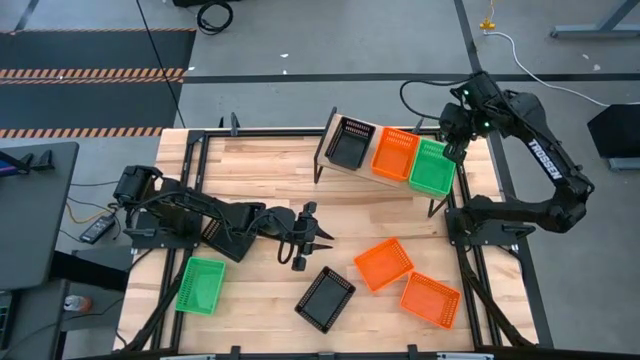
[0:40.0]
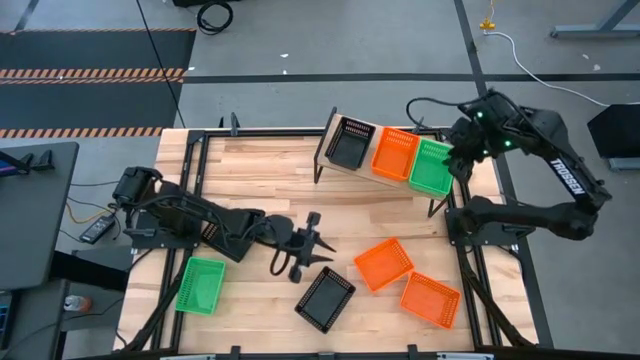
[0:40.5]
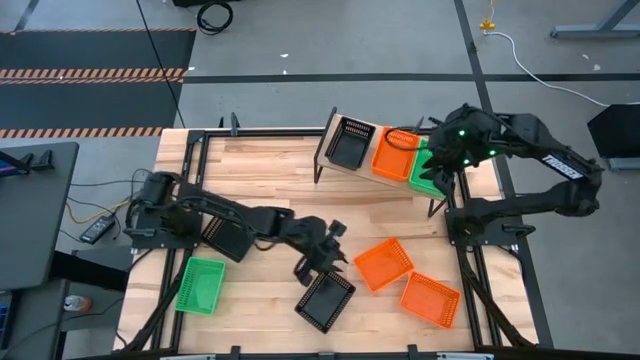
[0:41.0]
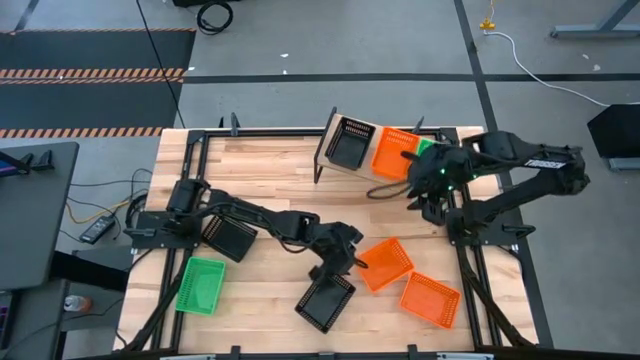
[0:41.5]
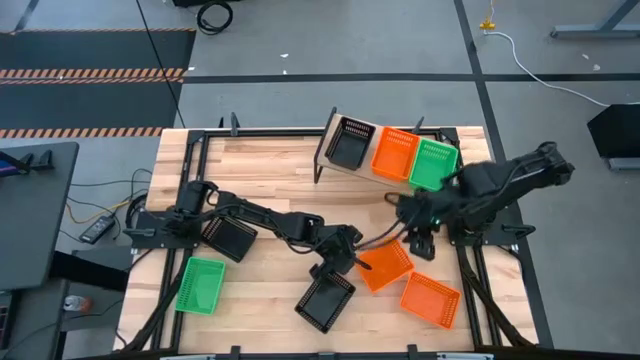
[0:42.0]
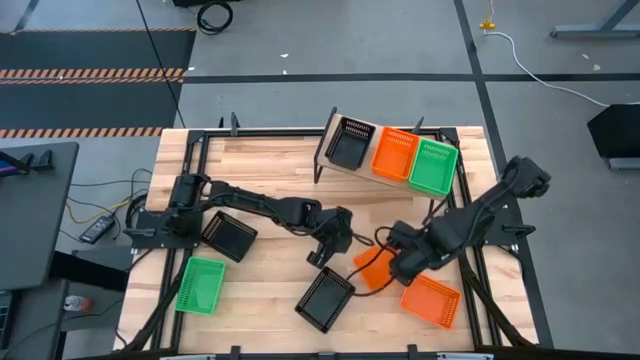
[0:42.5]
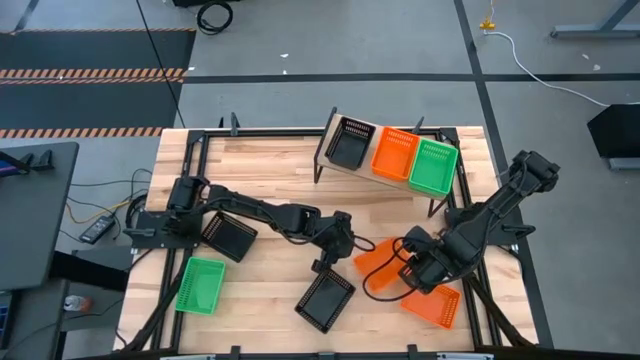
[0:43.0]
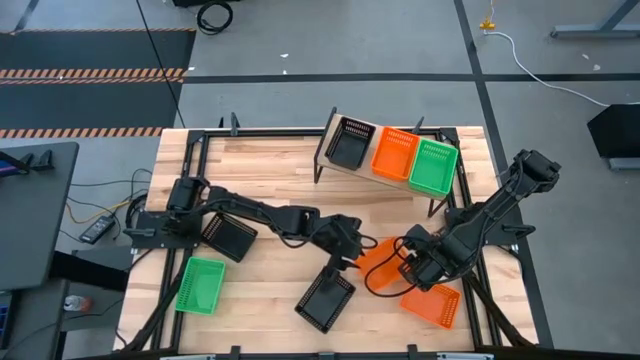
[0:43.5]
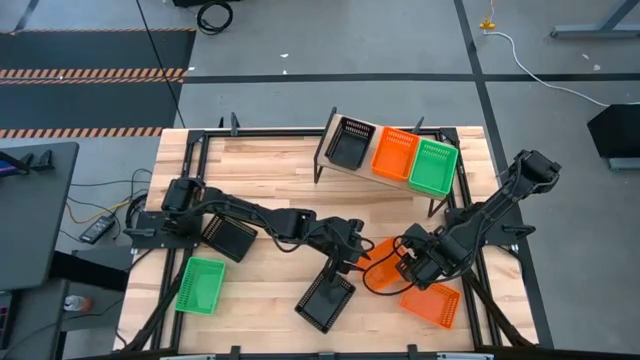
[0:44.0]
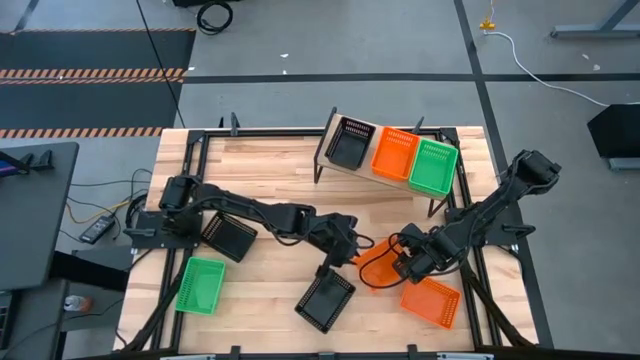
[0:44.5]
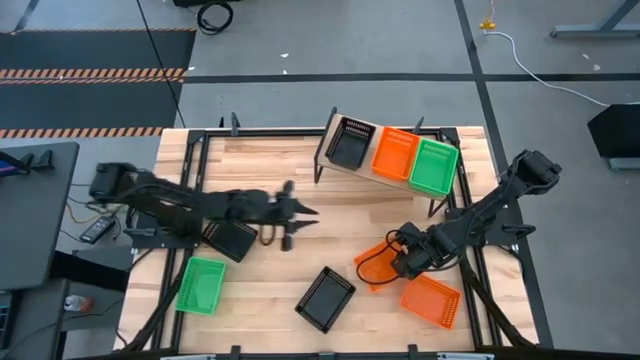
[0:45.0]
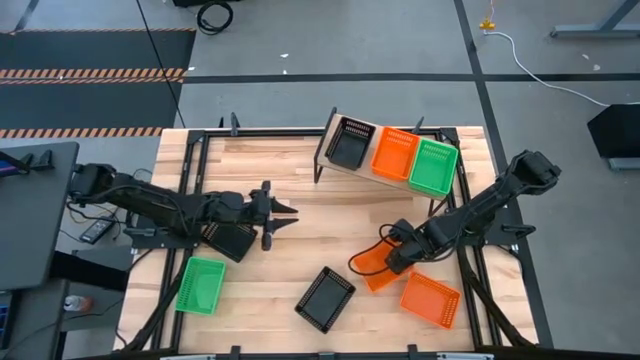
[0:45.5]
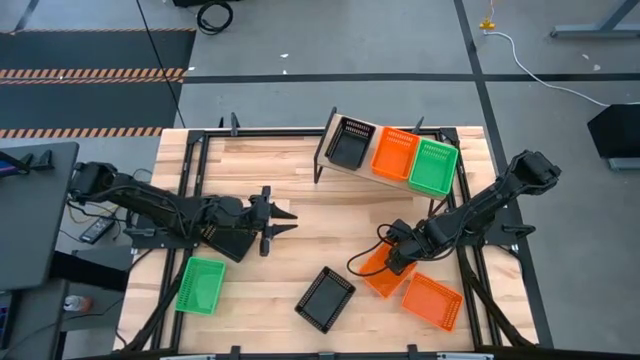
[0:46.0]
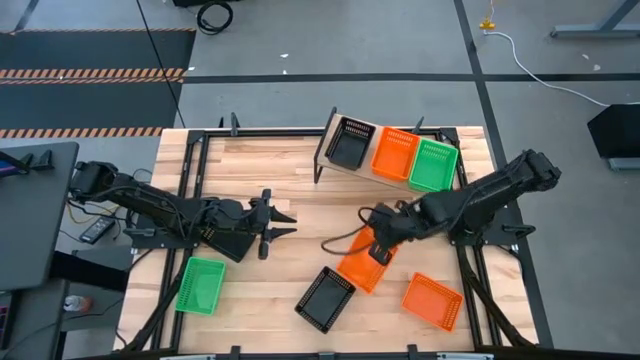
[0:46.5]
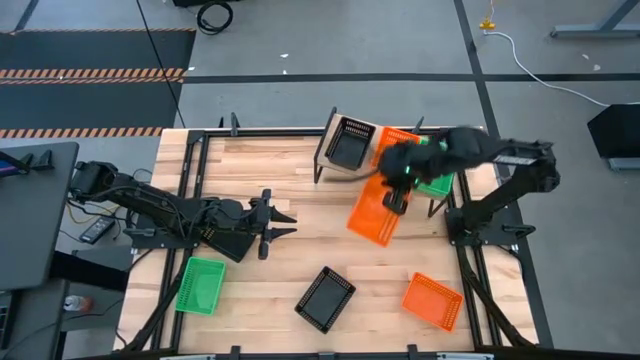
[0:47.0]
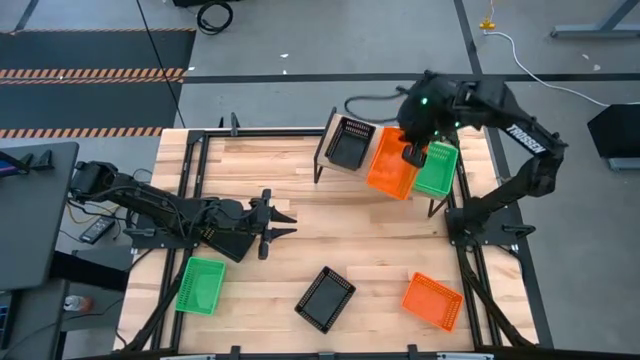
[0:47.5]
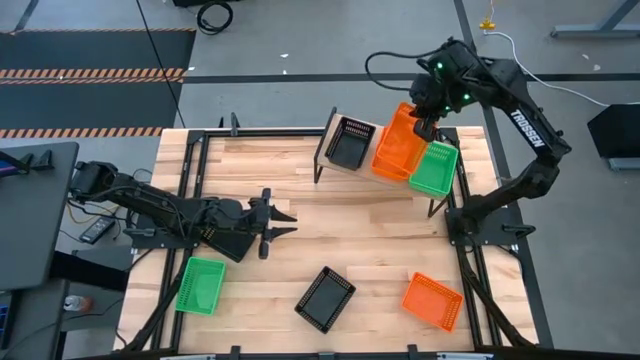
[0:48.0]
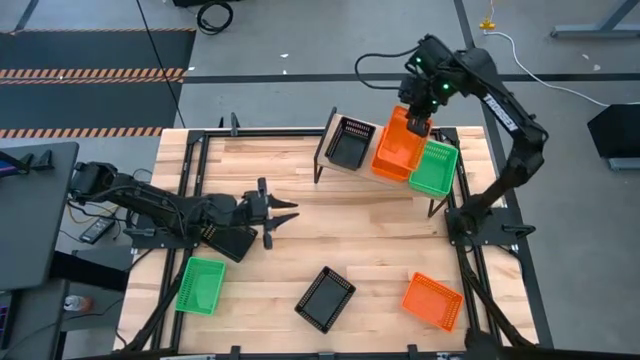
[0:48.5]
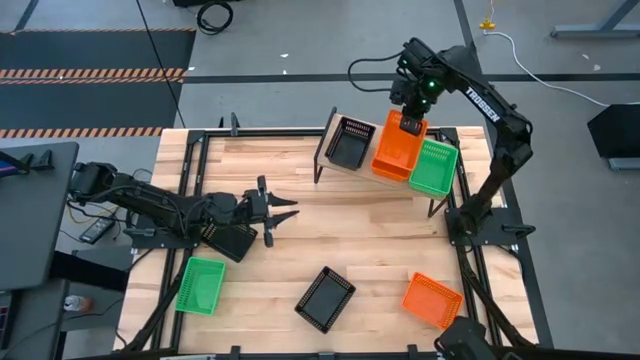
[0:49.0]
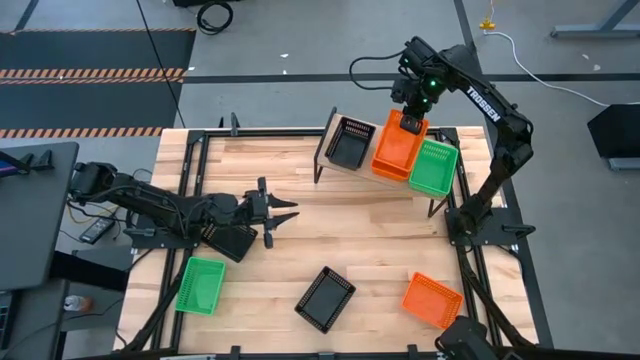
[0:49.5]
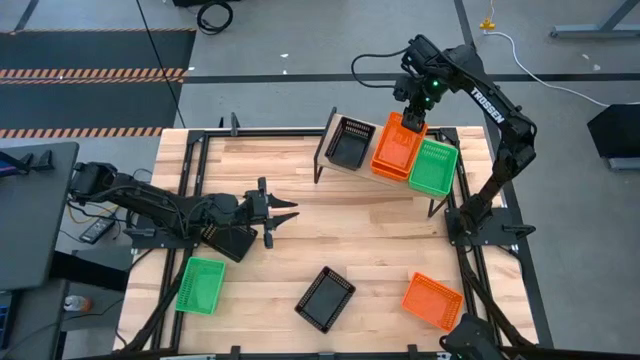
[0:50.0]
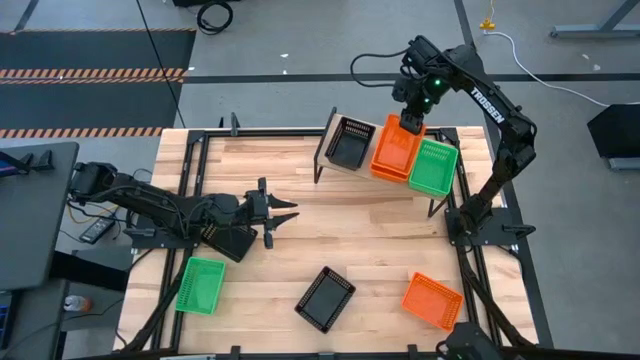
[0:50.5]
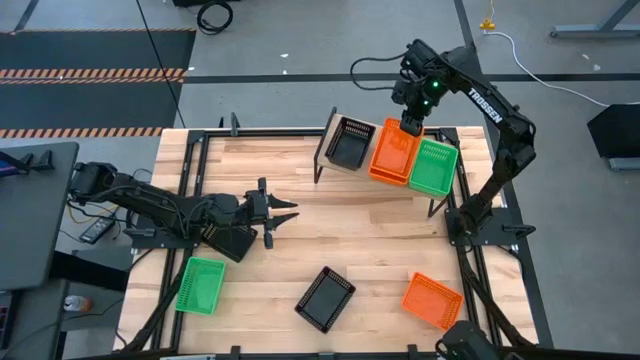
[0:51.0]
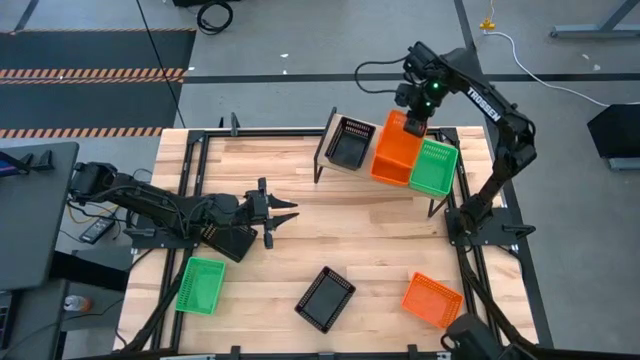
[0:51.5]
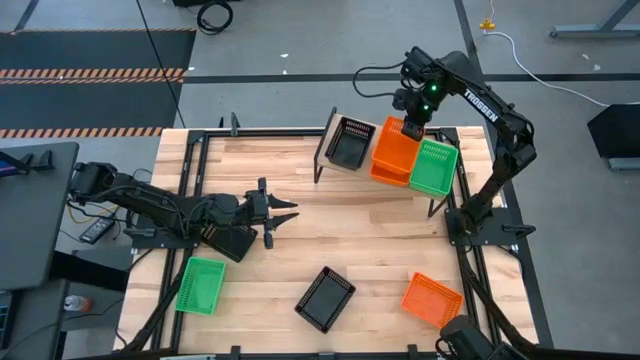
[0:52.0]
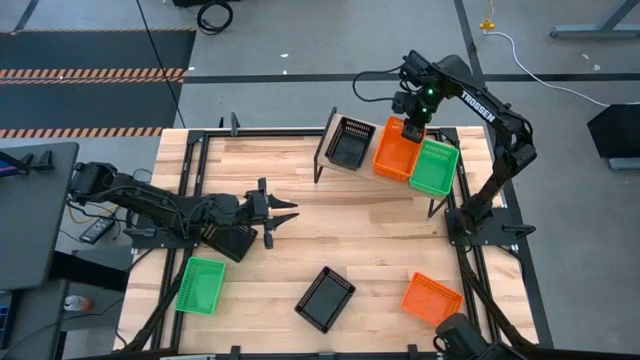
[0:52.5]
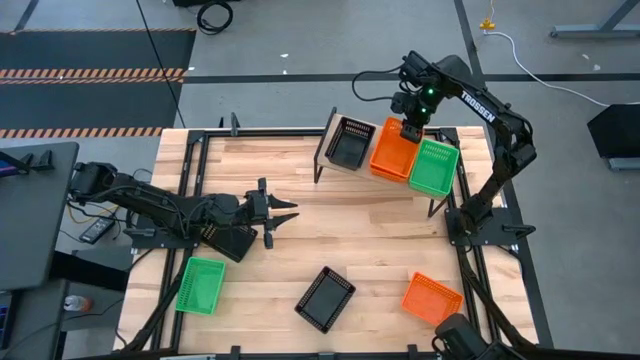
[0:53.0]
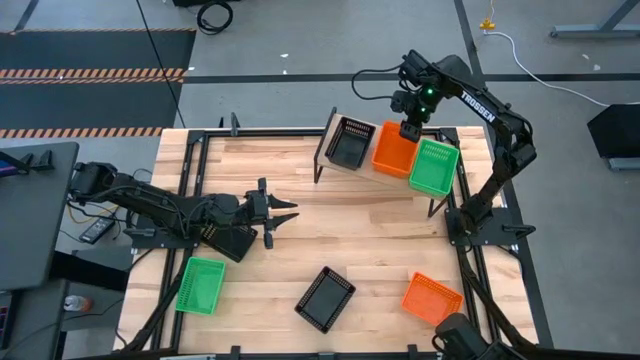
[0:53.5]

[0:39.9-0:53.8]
Task: Stack baskets on shelf by color
Stack the top orange bin on top of the orange bin on the shelf

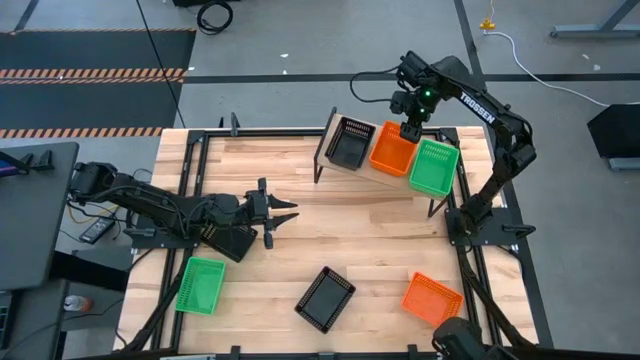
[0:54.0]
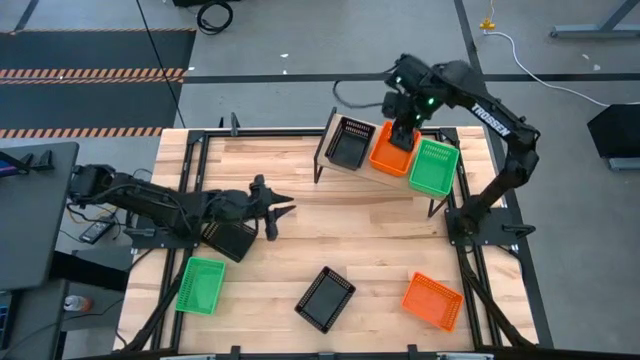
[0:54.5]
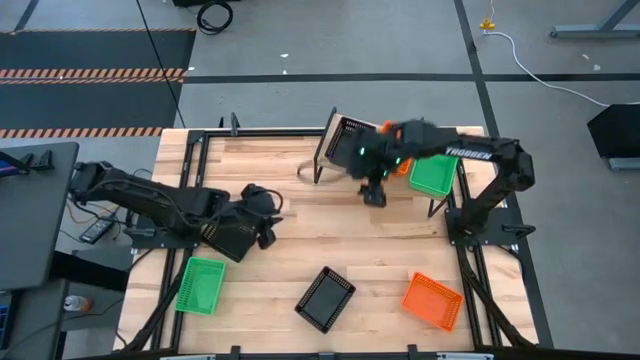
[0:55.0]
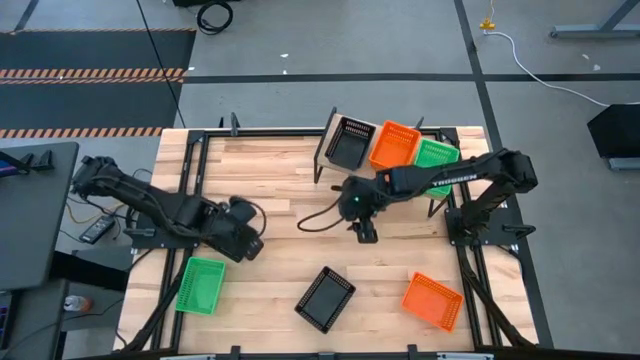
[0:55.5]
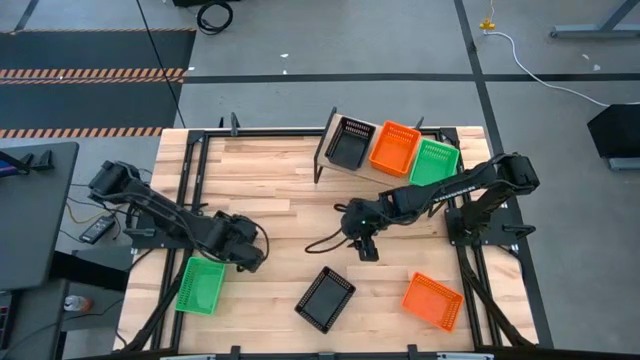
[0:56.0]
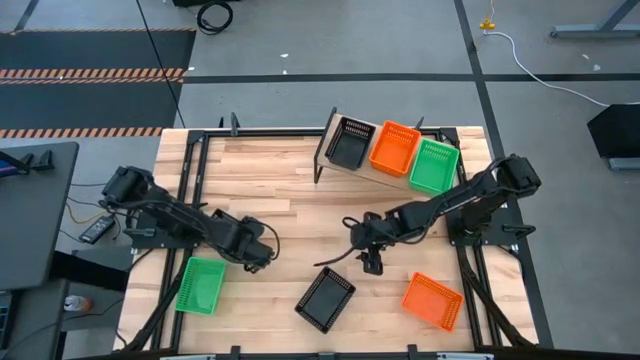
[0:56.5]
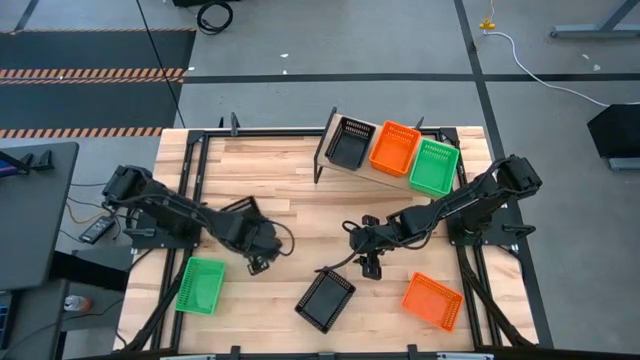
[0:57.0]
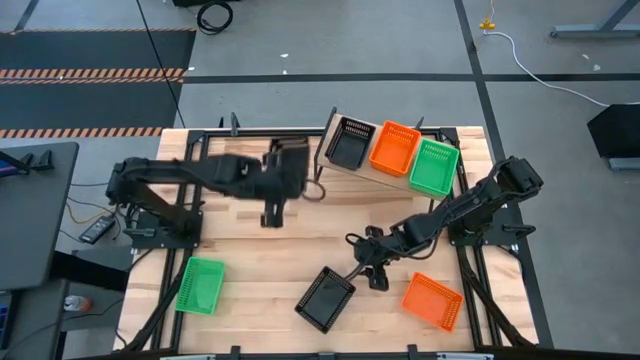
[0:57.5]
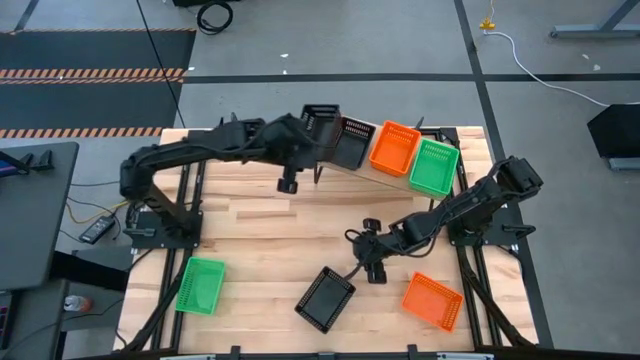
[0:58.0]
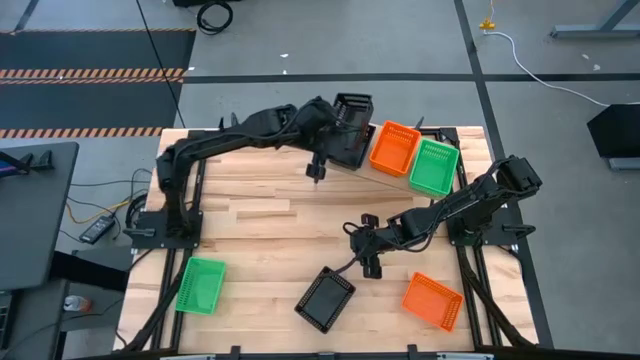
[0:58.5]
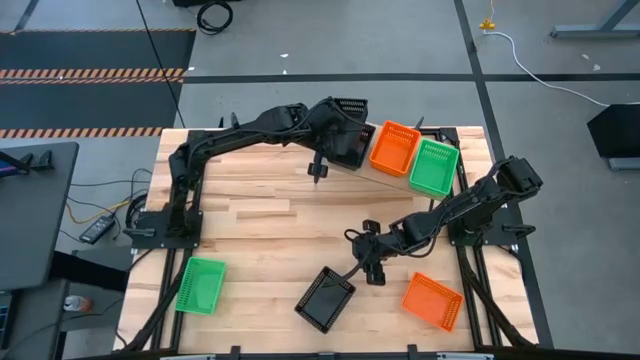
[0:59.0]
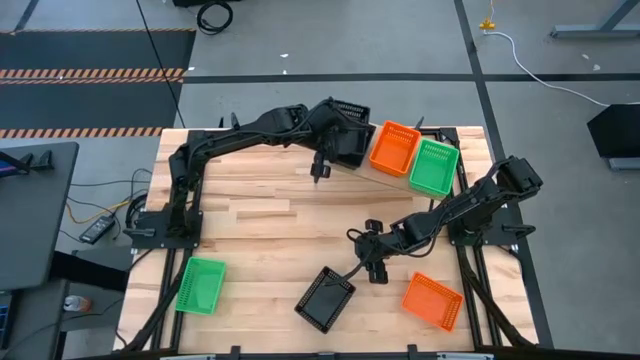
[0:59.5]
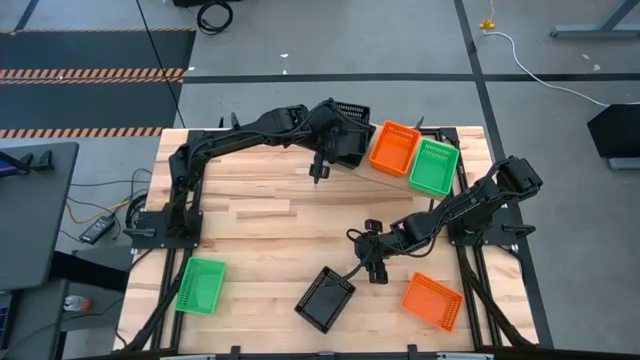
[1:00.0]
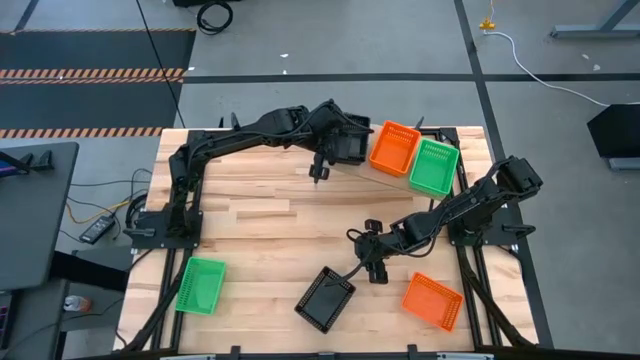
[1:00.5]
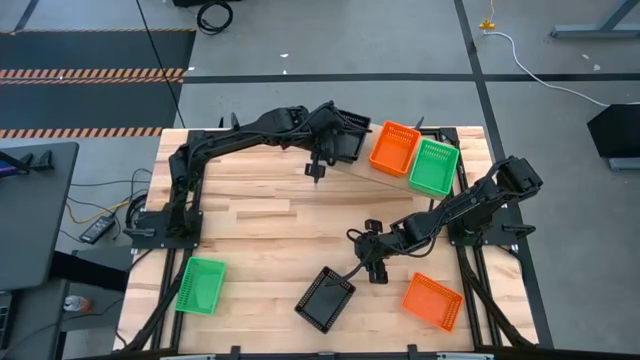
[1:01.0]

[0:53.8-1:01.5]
Stack the top black bin on top of the black bin on the shelf

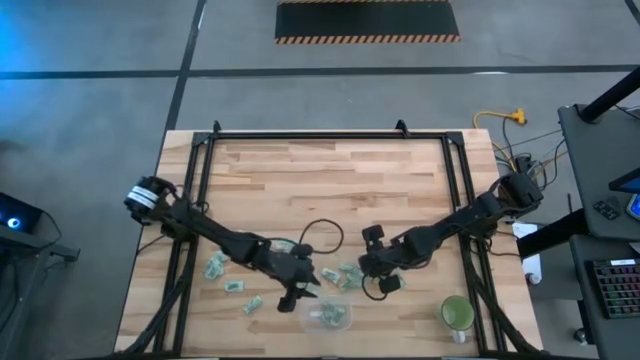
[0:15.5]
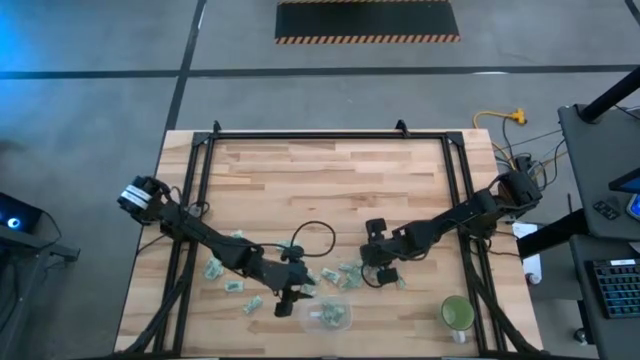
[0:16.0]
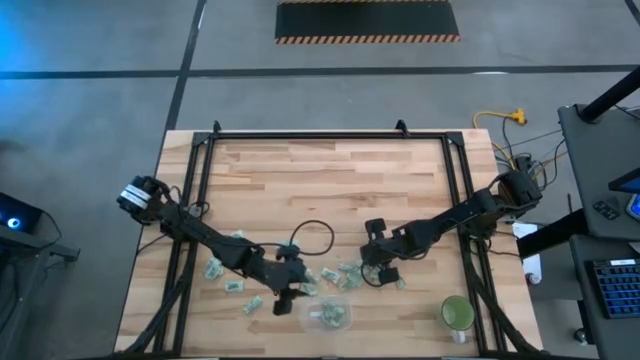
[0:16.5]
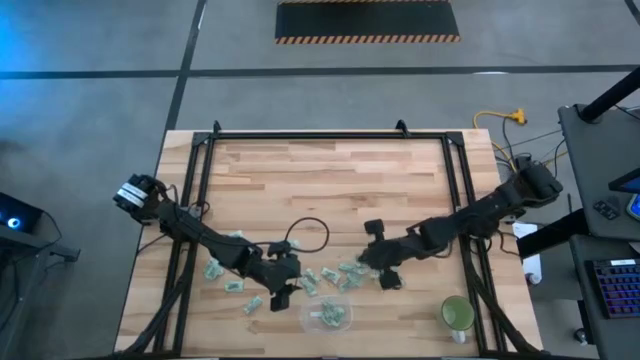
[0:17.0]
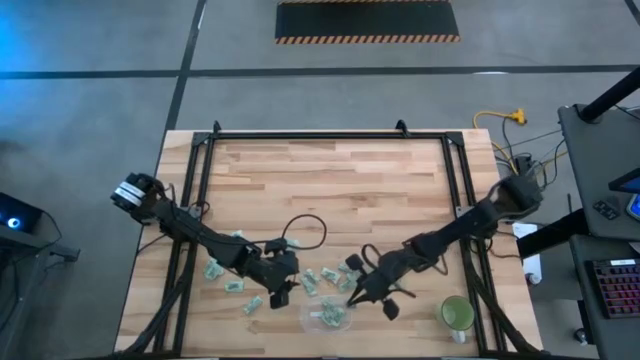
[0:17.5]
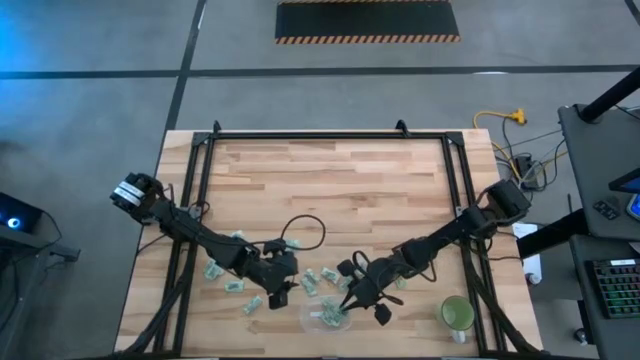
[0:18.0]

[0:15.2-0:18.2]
Task: Pick and place Stevia / Truvia into bins
Put the stevia packet into the transparent container
